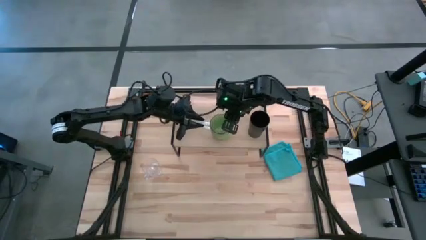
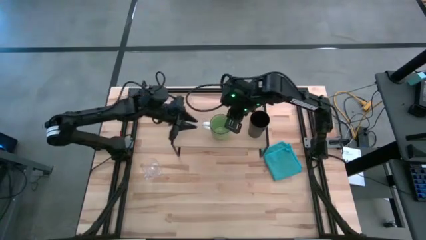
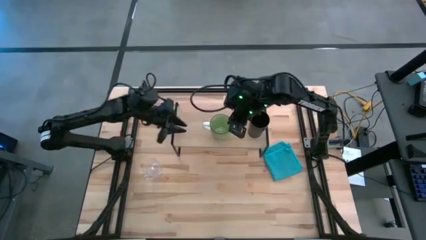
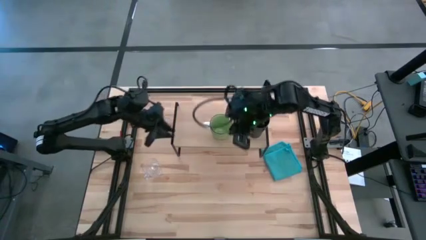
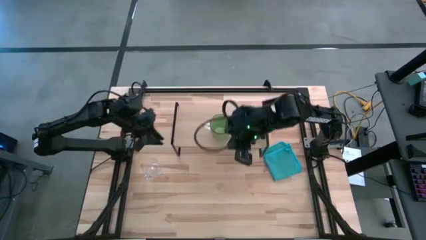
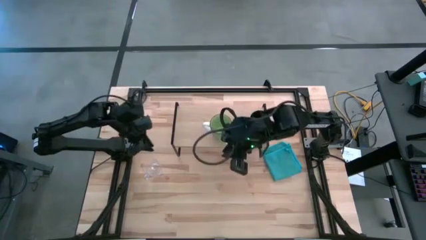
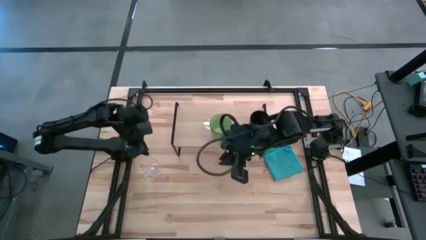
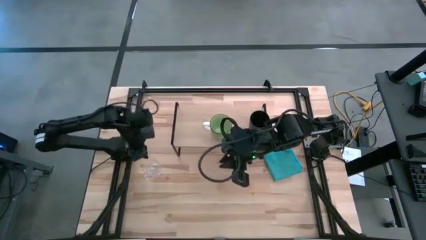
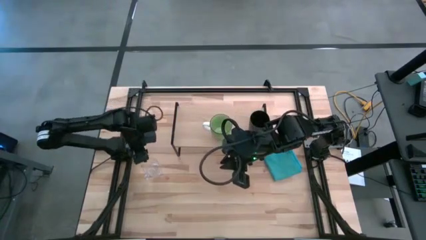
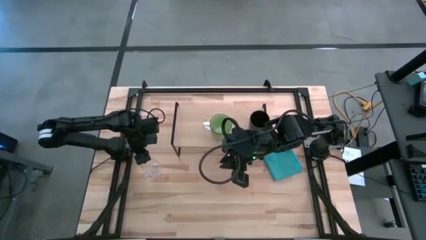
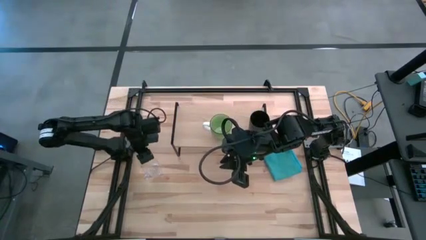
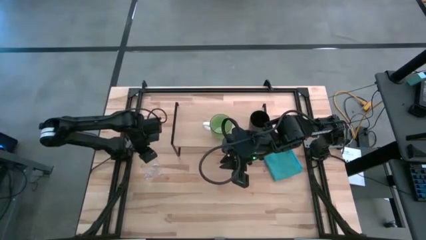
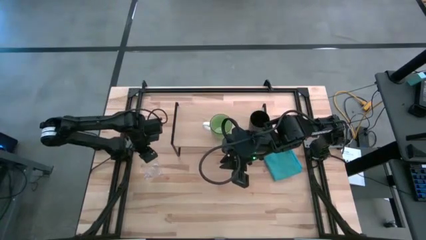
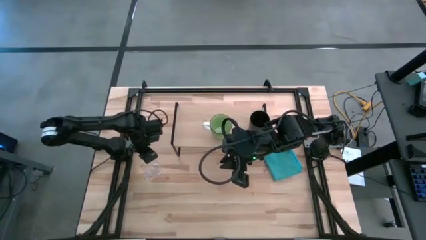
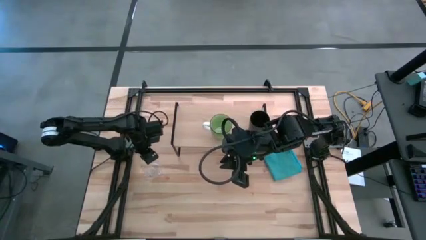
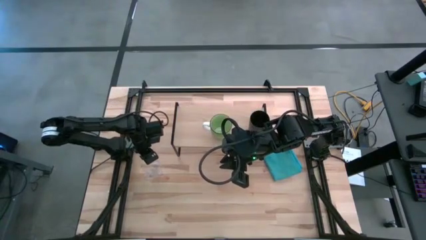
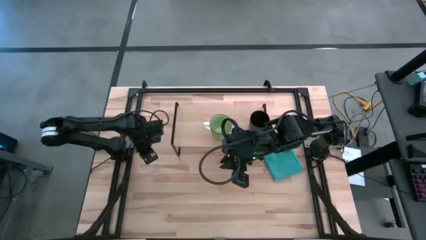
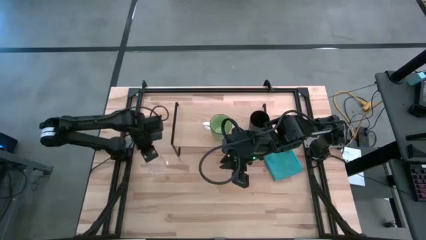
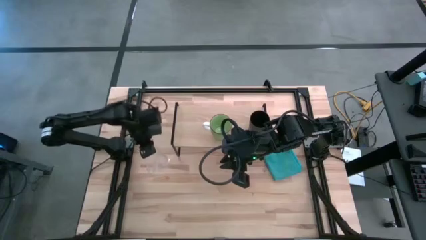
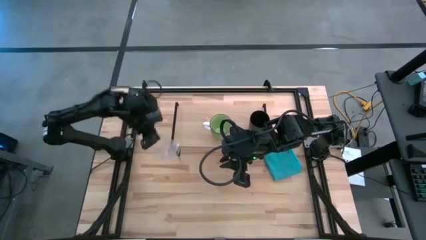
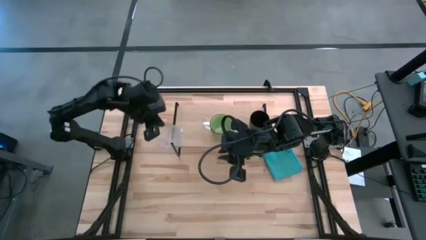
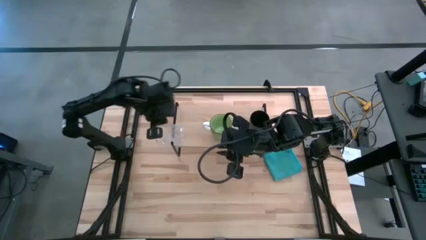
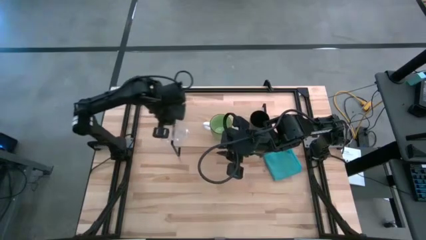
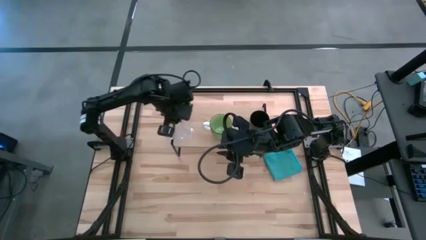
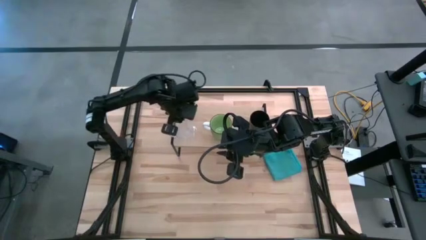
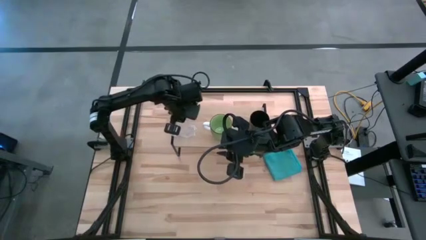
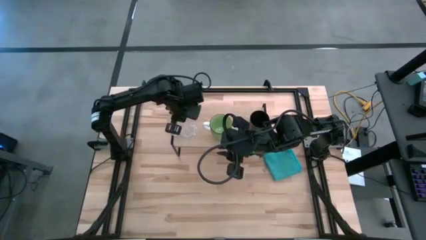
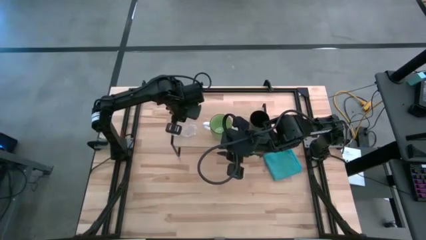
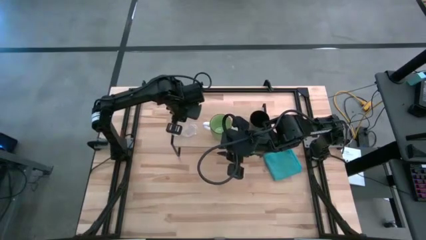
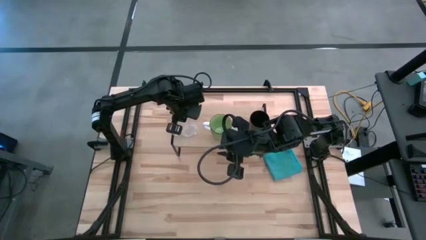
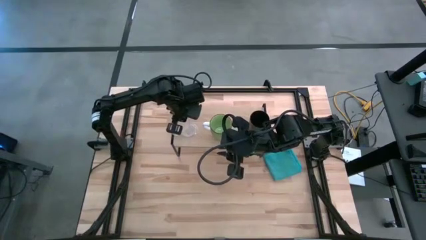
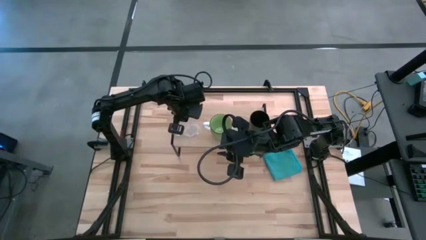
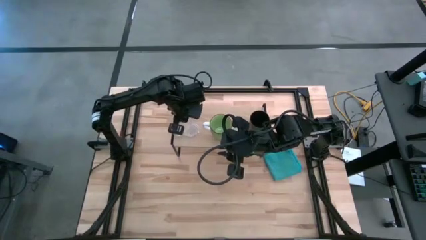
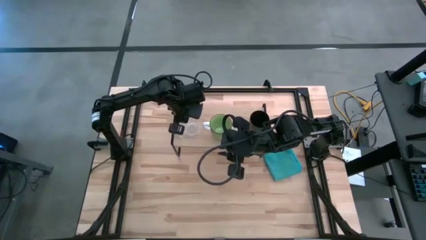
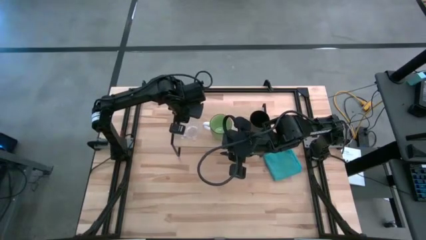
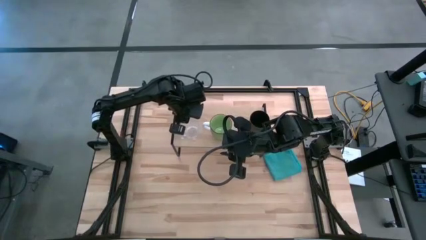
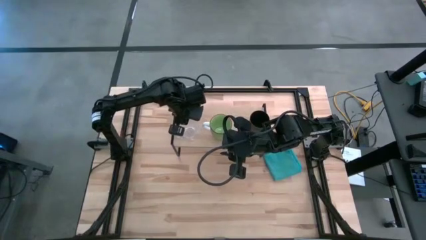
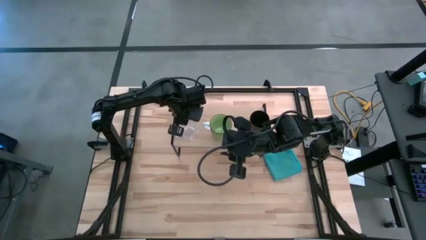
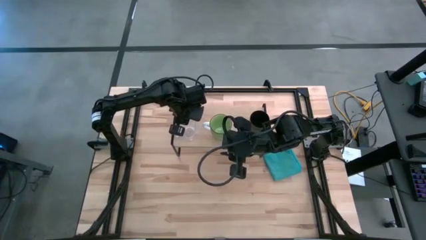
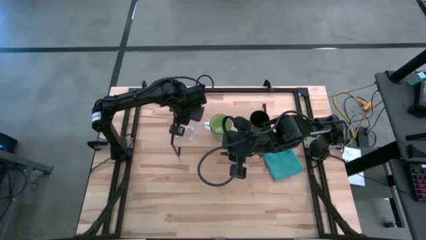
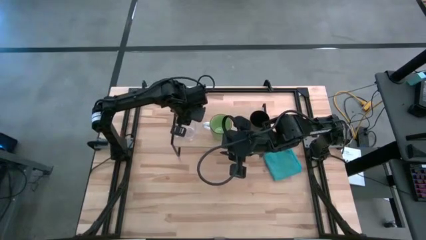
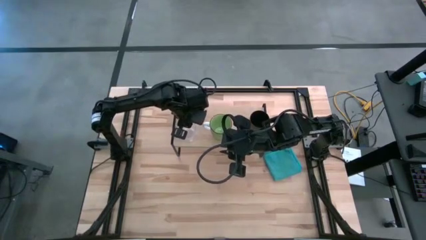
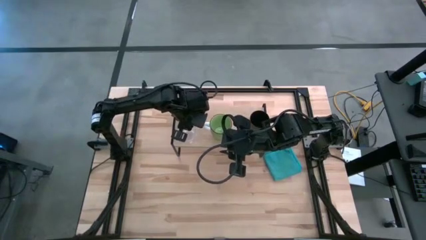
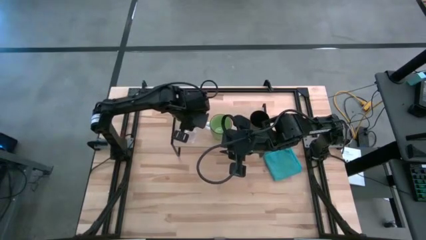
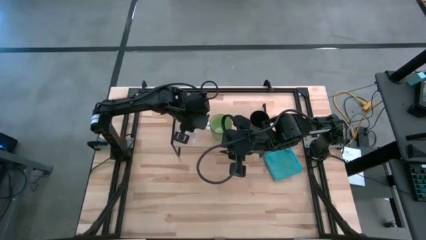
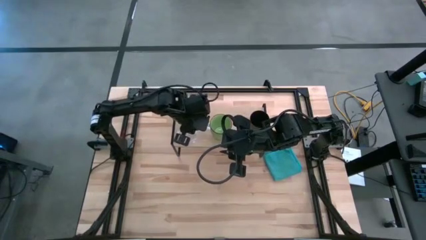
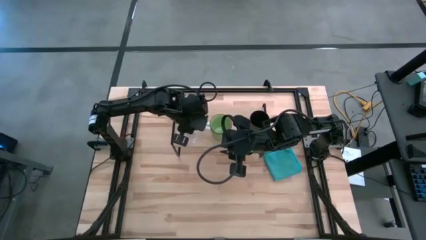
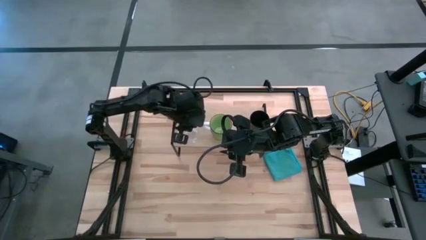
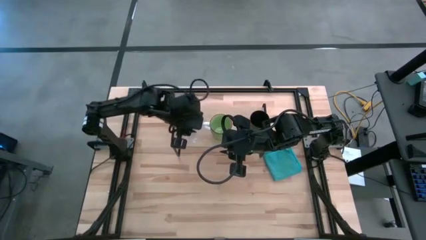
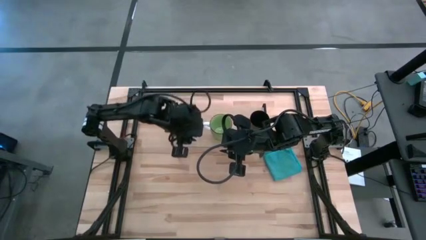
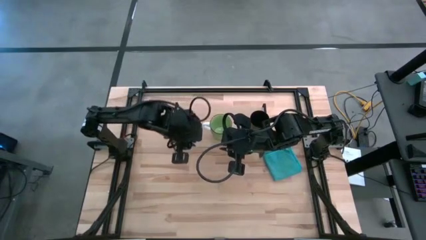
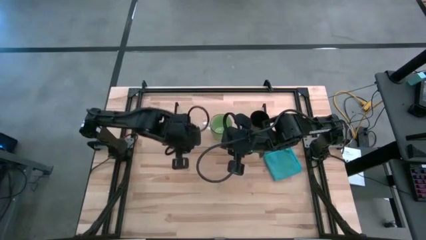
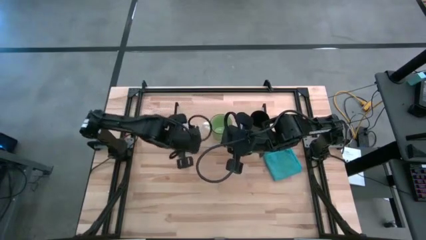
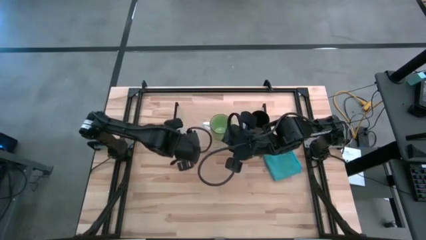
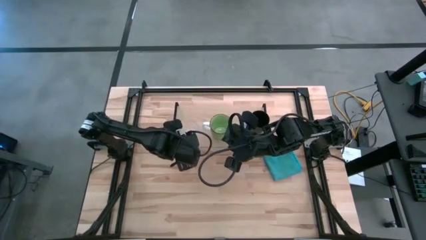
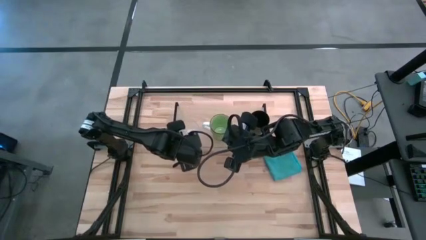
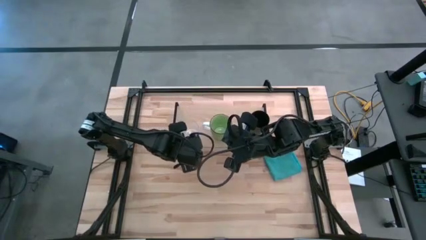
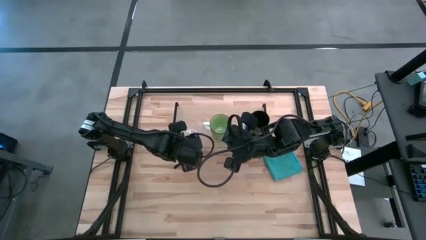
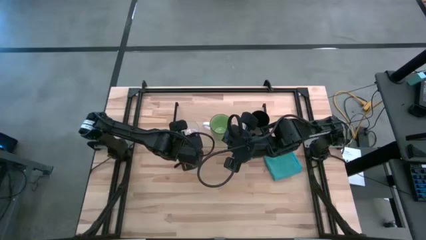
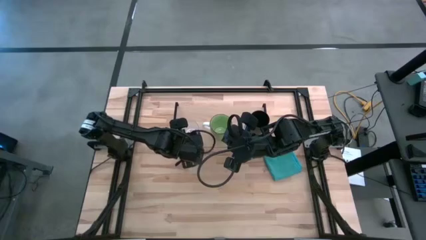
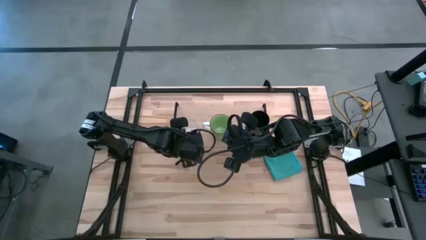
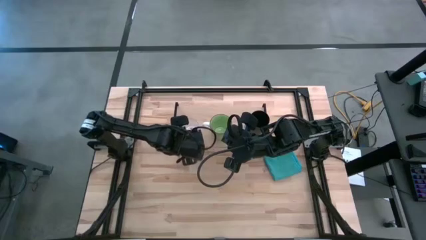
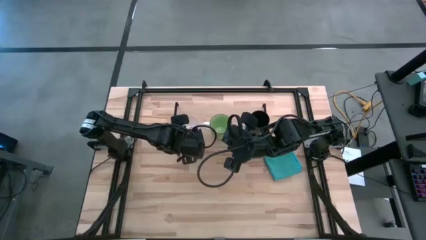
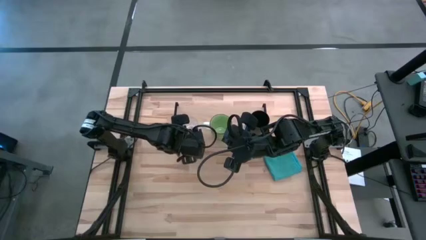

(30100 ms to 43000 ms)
Task: Stack small to large cups/mugs on shelf
Put the transparent mug on the shelf
